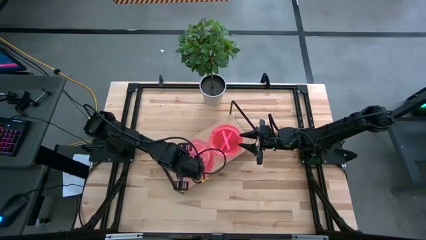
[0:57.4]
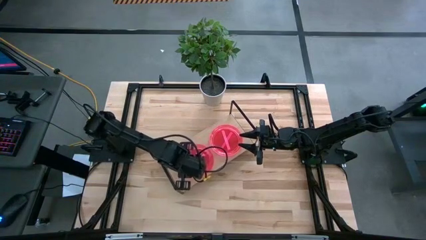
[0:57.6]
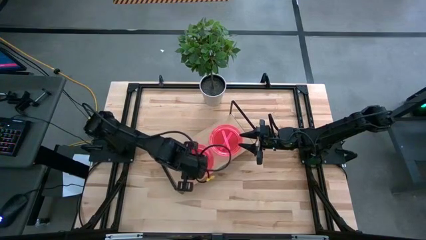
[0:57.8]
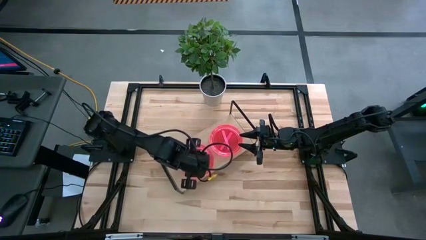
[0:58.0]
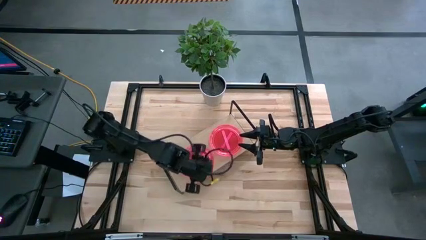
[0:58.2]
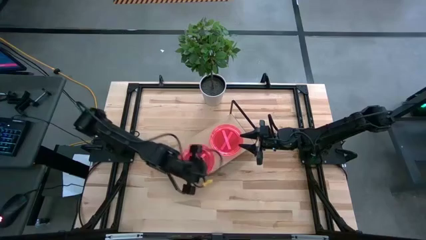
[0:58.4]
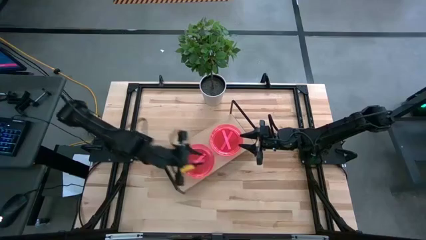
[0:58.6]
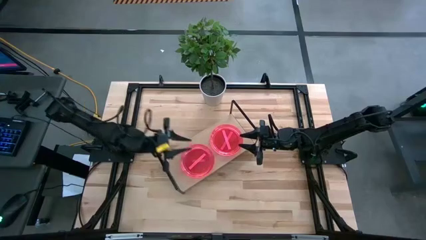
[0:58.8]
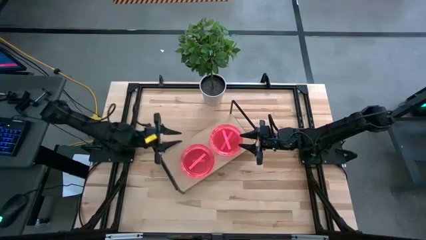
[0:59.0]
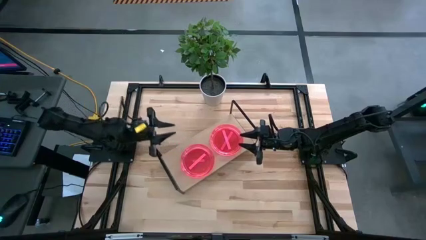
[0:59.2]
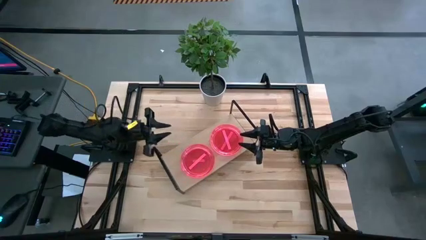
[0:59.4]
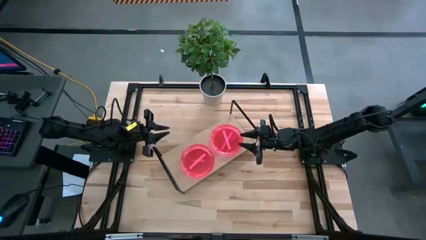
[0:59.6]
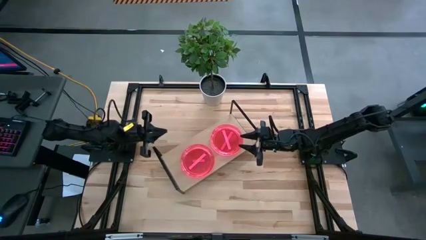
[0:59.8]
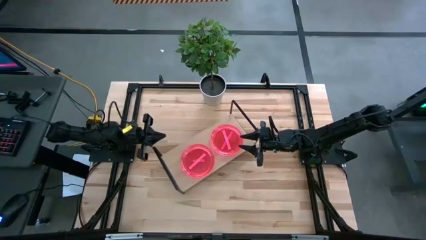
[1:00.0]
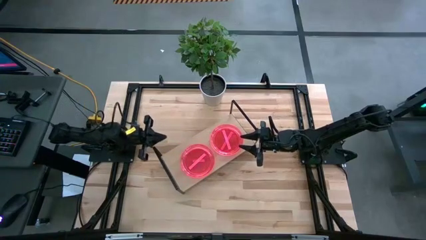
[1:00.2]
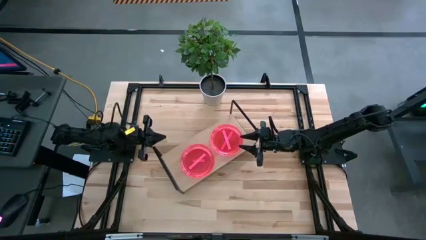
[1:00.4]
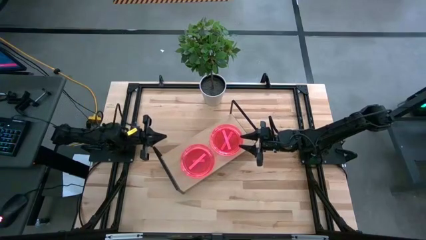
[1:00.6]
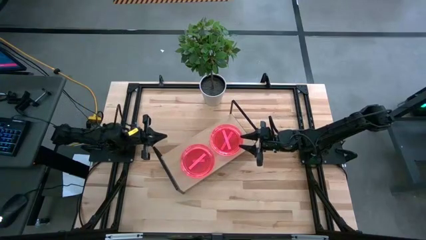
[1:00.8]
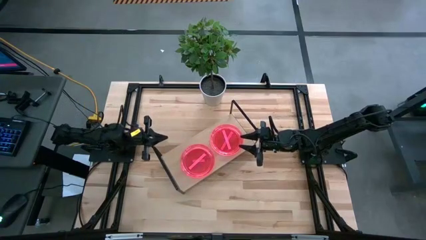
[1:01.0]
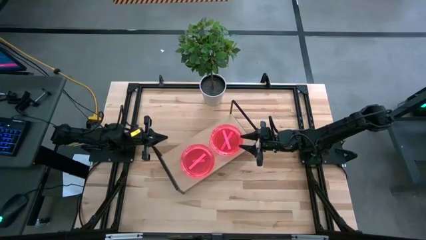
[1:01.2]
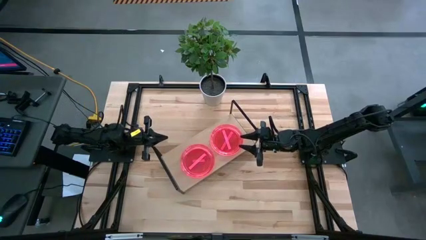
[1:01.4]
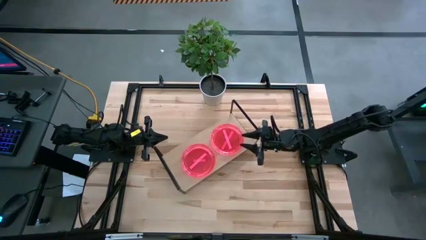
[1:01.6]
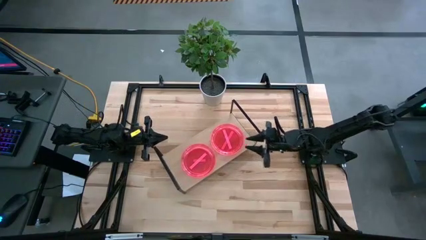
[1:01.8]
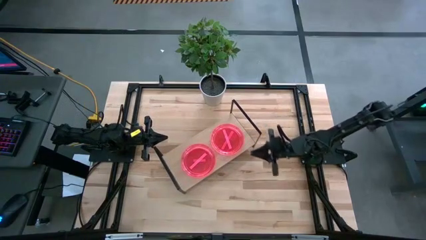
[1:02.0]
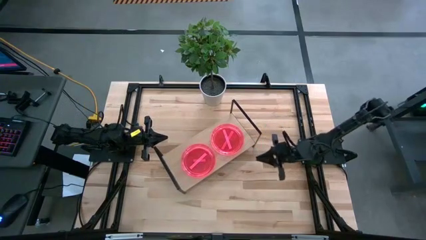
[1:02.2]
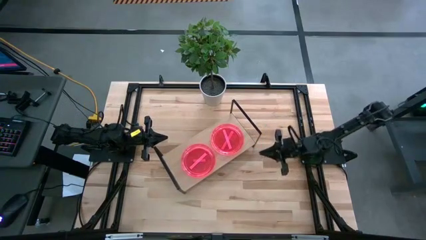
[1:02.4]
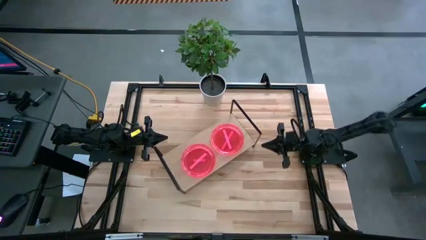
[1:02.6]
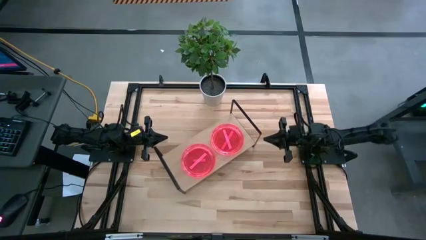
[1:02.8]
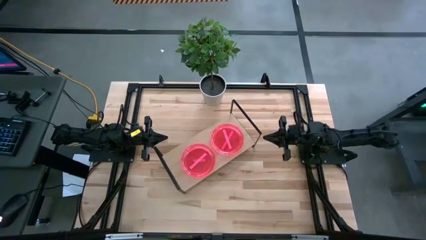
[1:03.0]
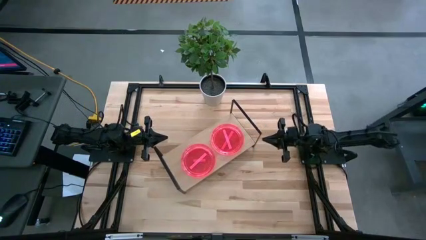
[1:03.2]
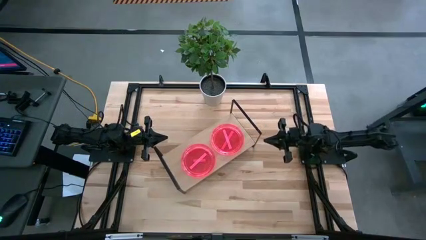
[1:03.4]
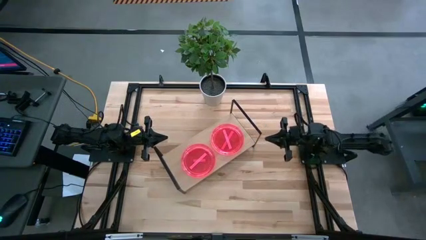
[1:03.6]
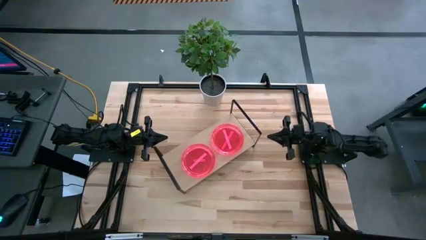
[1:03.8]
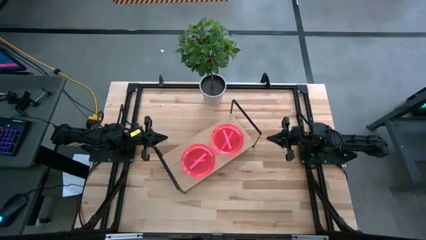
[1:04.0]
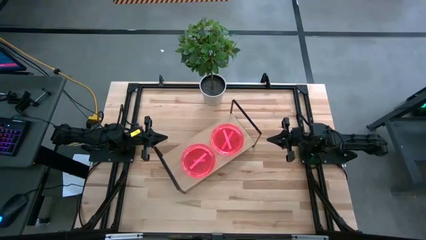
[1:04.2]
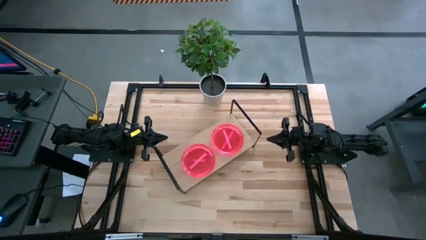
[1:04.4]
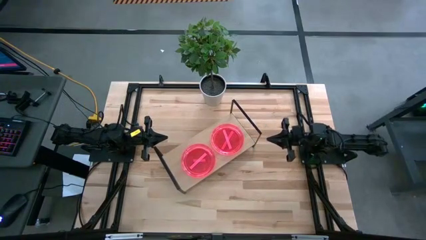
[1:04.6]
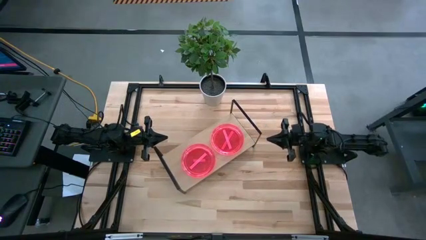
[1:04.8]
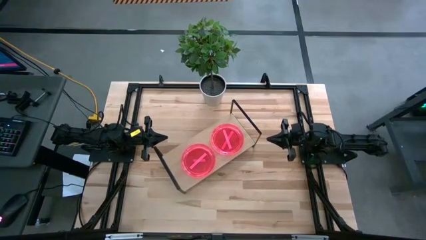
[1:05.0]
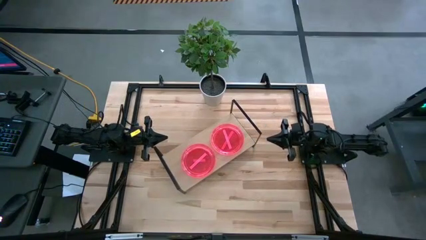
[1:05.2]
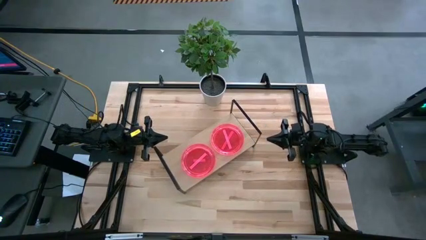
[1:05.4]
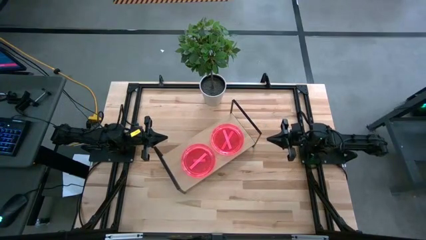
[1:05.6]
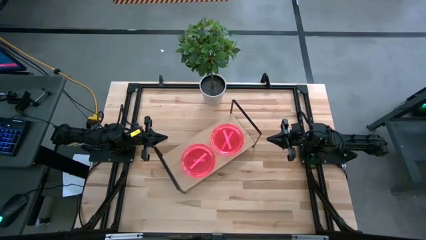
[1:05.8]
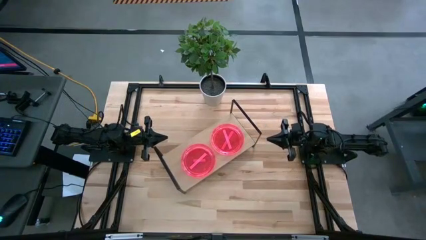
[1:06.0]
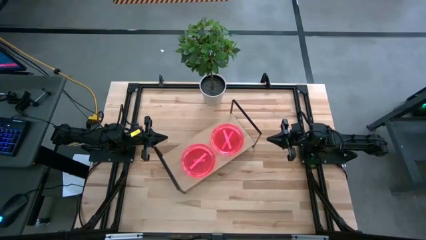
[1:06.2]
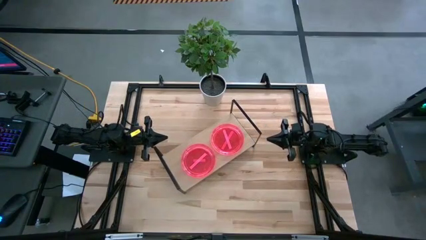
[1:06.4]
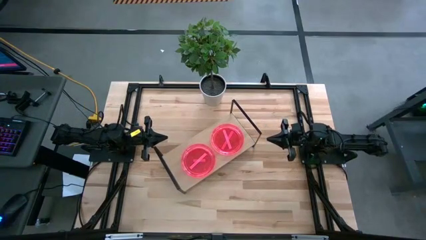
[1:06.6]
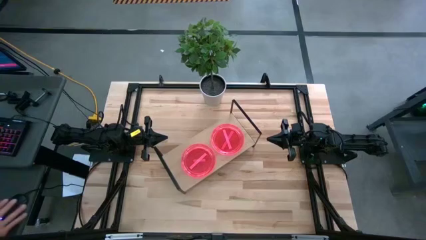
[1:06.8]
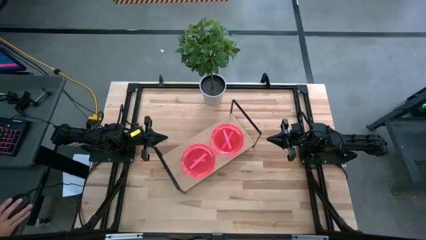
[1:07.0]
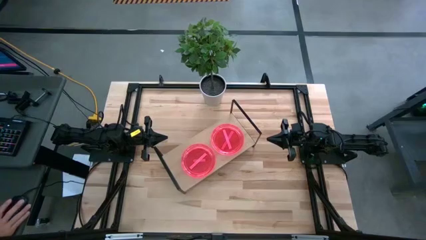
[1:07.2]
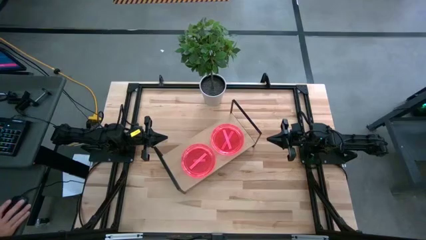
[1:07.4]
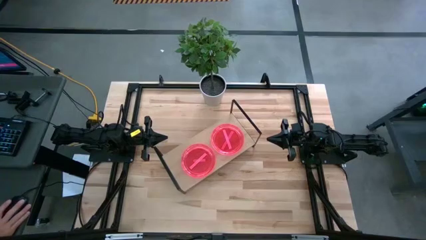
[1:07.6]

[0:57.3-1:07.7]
Task: Place and stack plates onto a shelf
Return to Home Position

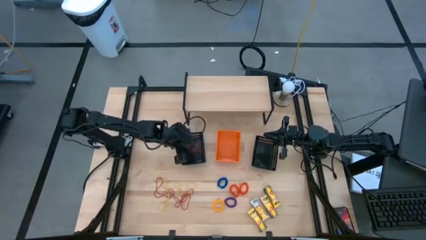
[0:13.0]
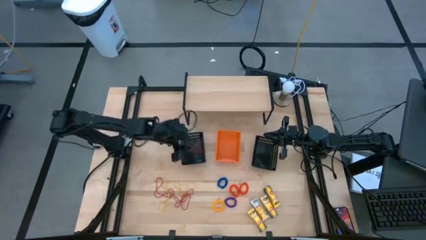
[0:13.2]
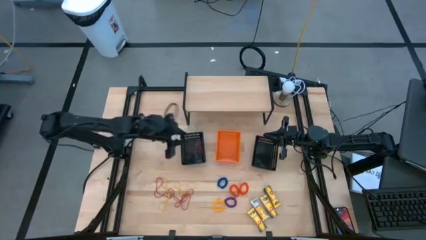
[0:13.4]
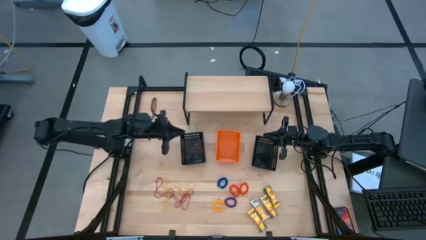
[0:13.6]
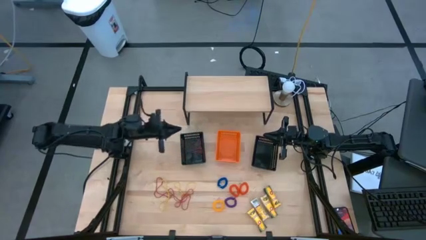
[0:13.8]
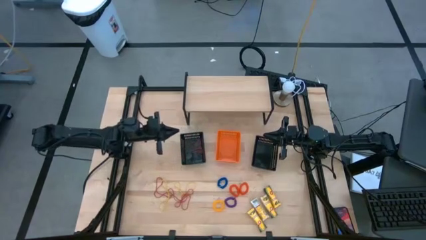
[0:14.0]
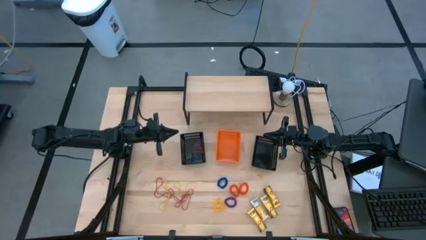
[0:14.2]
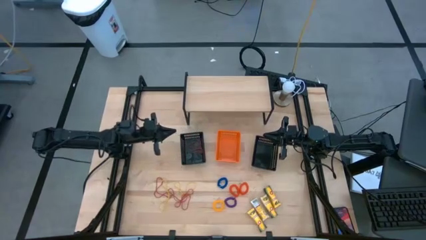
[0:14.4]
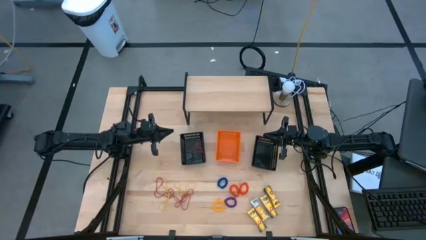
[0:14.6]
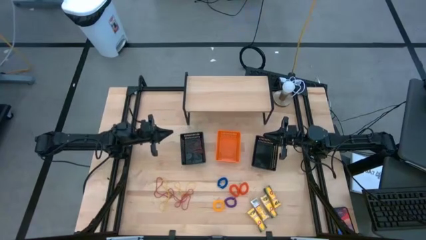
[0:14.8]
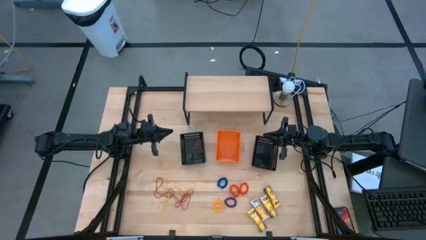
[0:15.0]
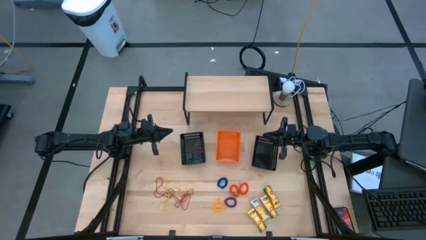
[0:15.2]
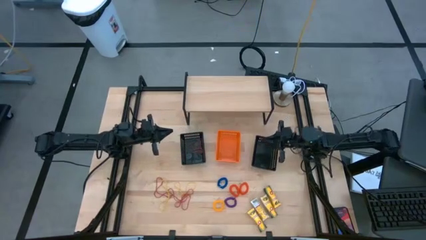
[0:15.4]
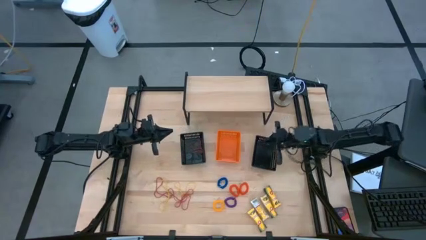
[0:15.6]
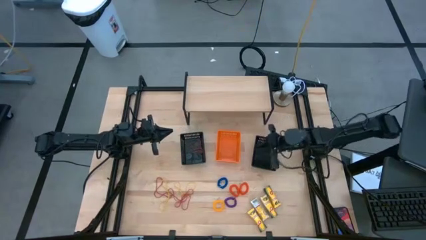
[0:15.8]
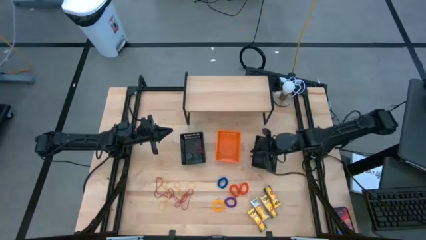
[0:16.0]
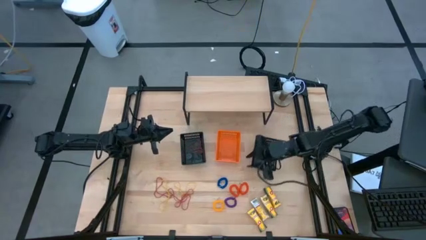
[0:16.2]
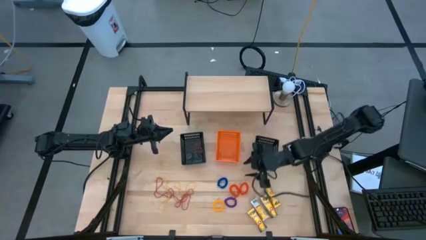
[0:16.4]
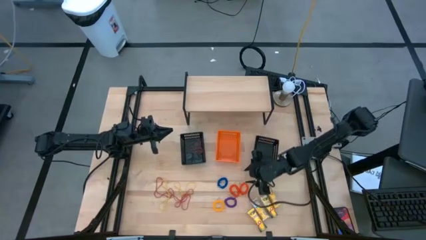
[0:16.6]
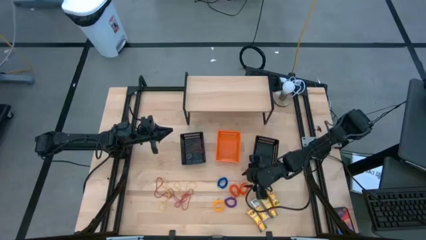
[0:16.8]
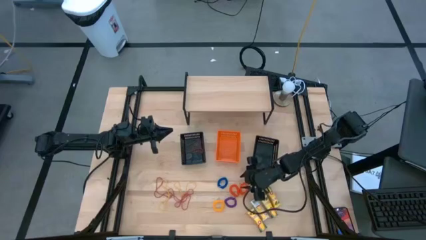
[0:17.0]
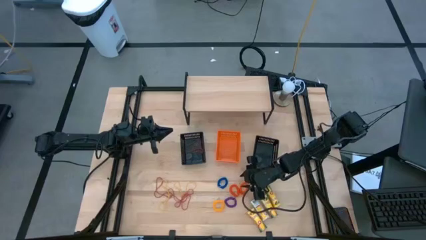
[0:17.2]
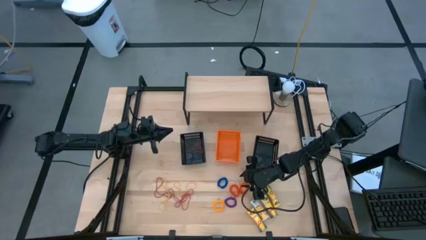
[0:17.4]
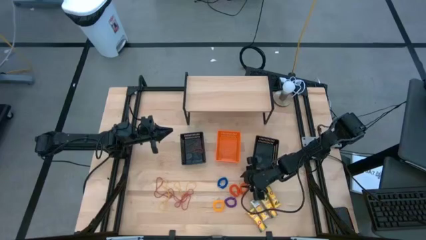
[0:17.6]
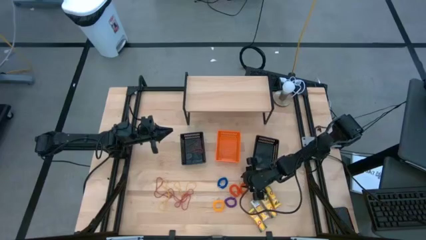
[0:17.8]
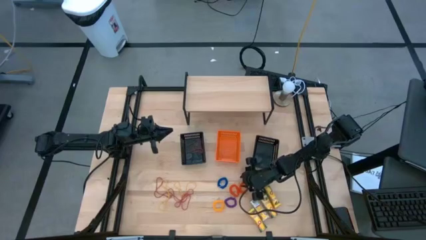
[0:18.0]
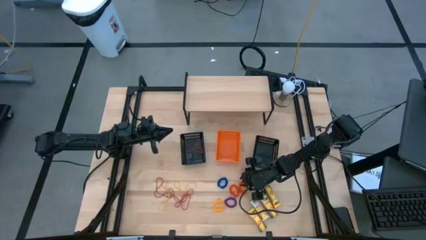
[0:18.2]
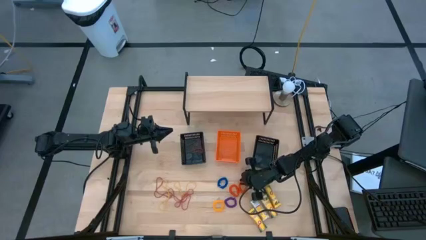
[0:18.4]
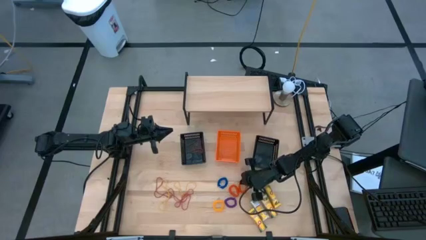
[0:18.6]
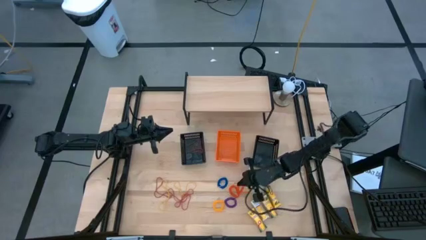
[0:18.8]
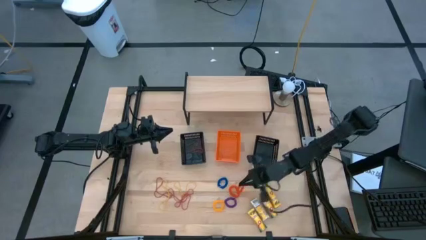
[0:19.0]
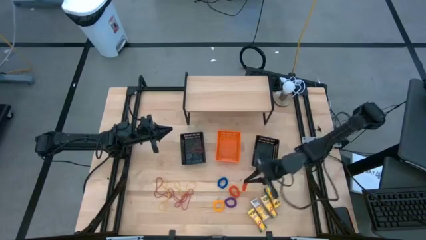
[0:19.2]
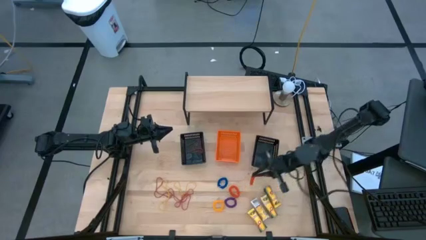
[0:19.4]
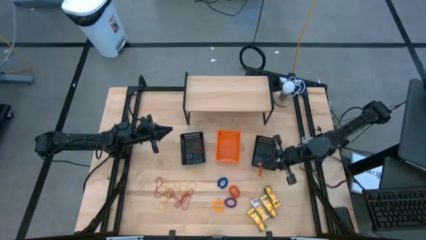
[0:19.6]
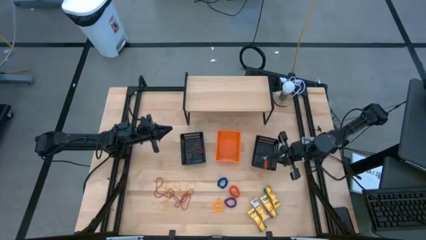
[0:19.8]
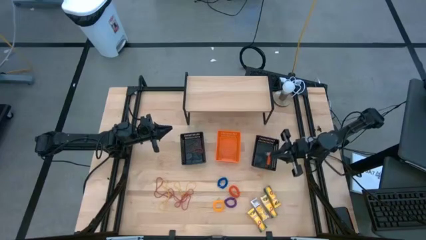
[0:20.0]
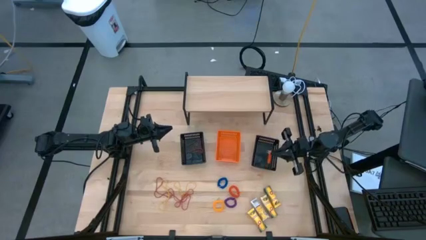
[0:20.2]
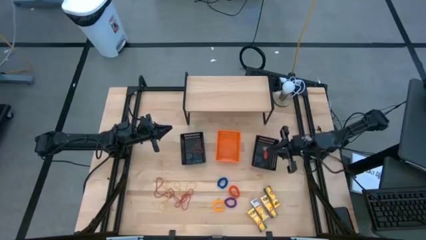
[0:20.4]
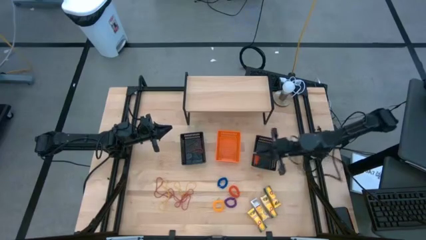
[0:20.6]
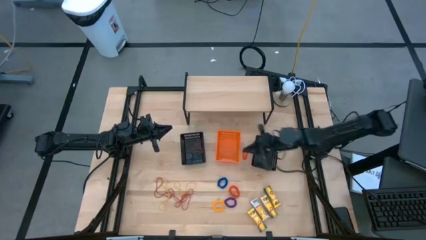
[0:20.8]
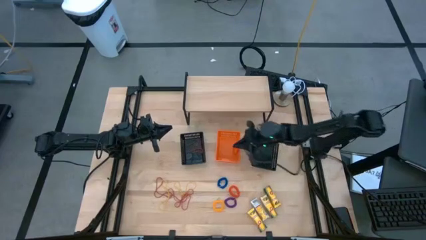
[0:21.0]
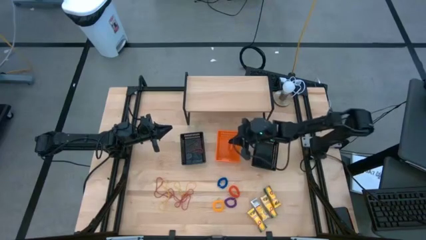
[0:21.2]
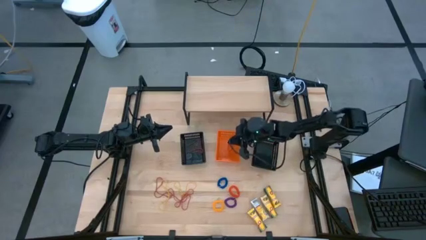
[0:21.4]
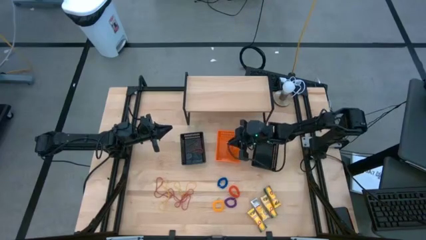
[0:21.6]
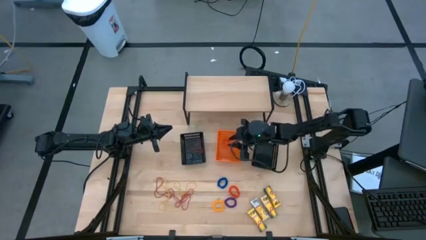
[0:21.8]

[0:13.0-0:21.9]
Task: Pick & Place Office Desk Supplies
Put the orange spring rubber band into the orange bin
